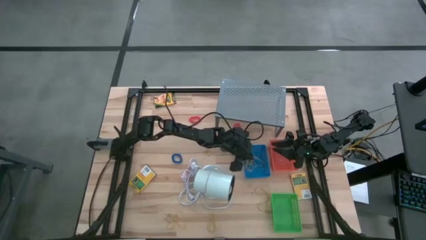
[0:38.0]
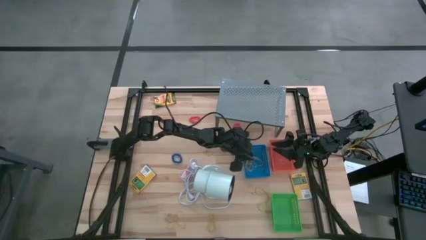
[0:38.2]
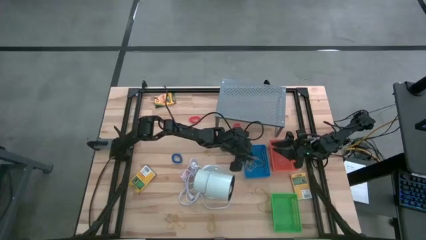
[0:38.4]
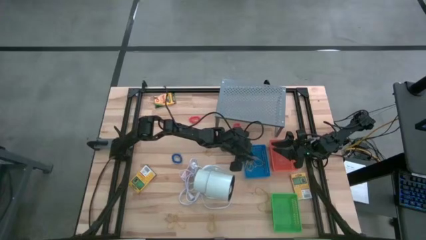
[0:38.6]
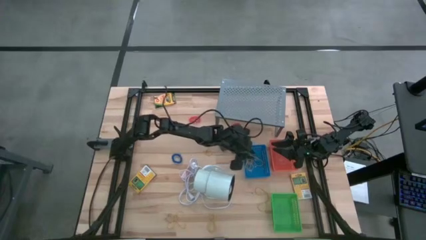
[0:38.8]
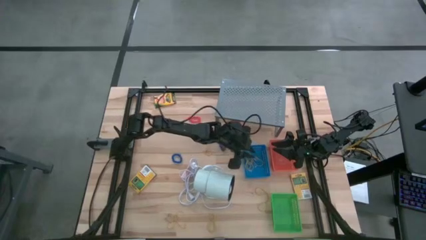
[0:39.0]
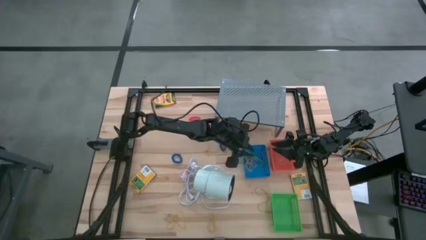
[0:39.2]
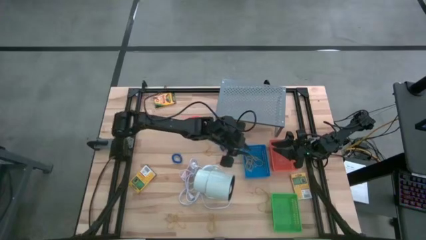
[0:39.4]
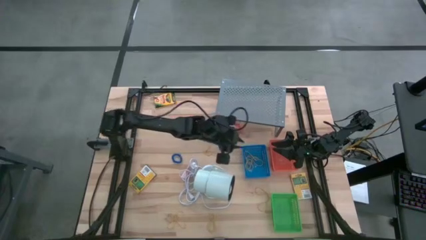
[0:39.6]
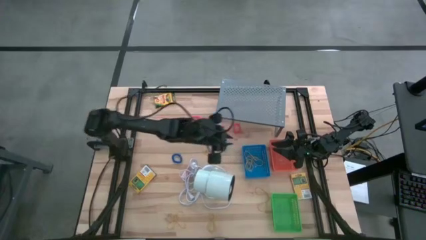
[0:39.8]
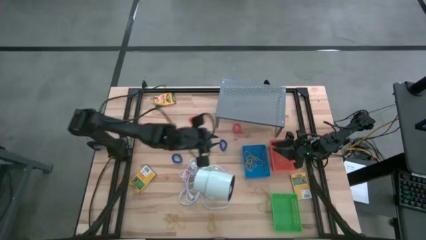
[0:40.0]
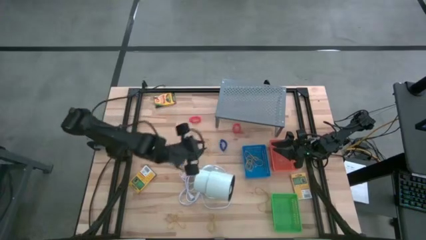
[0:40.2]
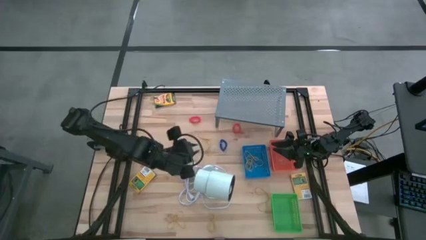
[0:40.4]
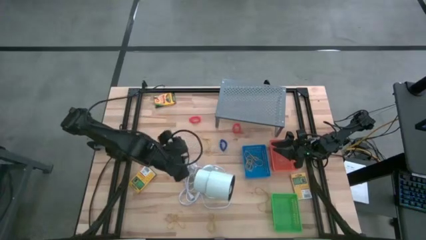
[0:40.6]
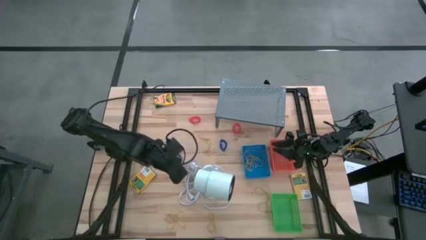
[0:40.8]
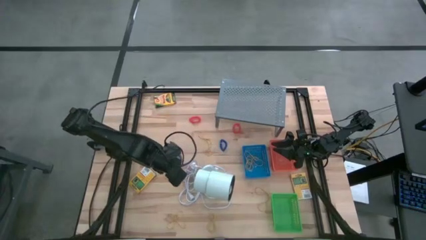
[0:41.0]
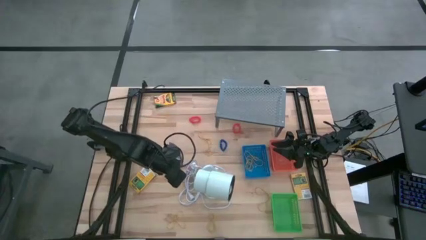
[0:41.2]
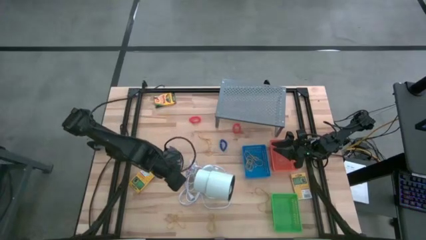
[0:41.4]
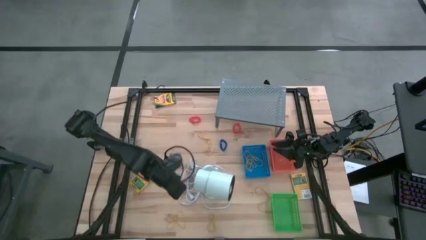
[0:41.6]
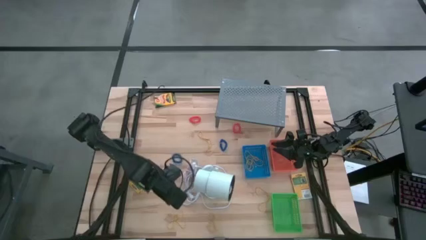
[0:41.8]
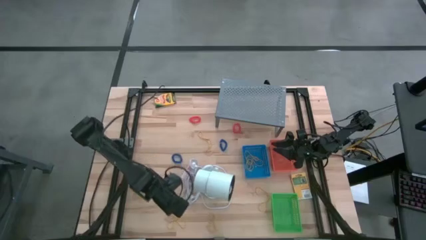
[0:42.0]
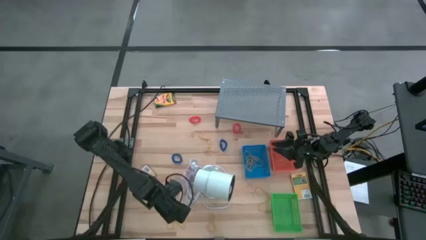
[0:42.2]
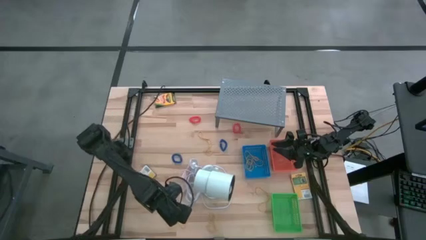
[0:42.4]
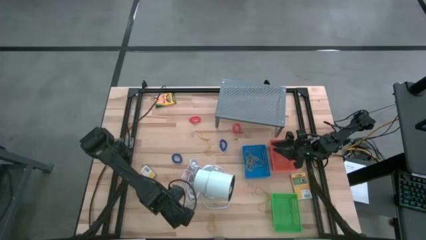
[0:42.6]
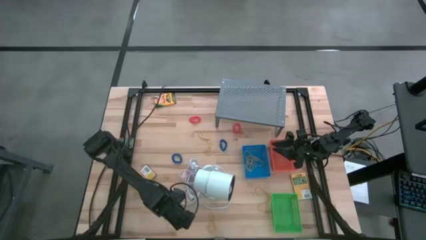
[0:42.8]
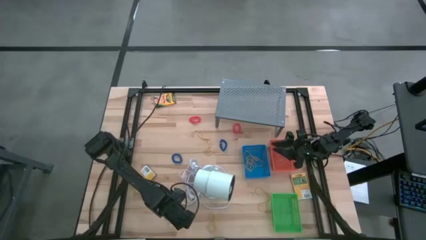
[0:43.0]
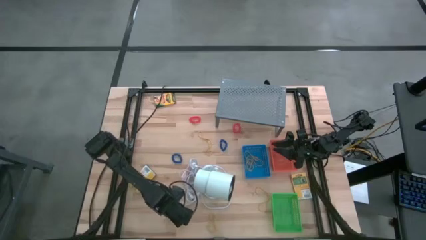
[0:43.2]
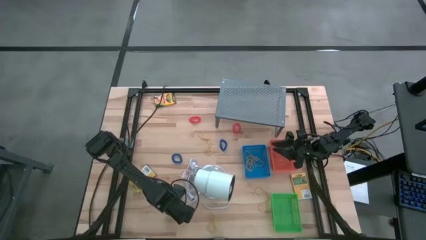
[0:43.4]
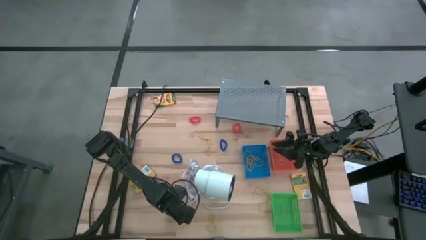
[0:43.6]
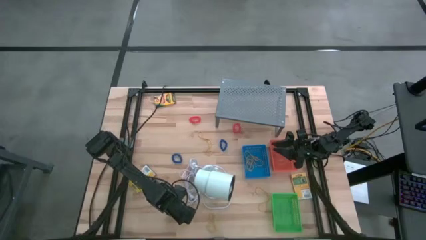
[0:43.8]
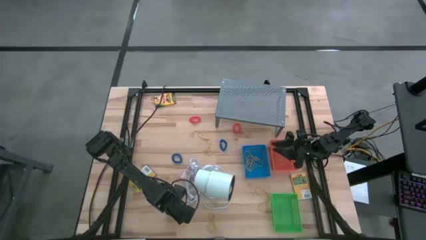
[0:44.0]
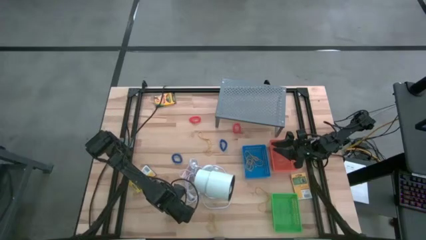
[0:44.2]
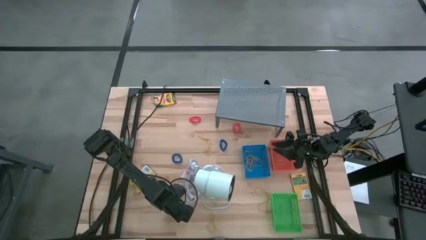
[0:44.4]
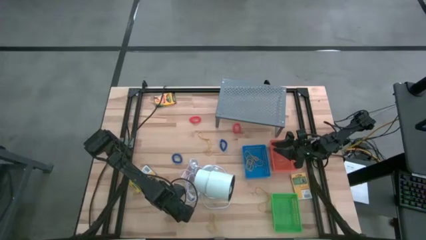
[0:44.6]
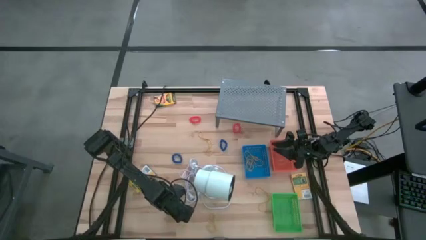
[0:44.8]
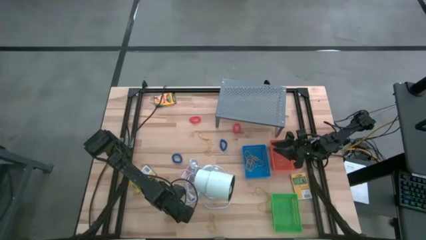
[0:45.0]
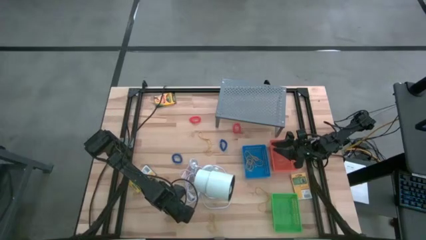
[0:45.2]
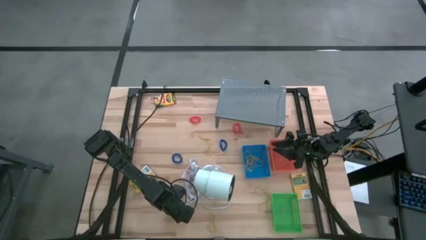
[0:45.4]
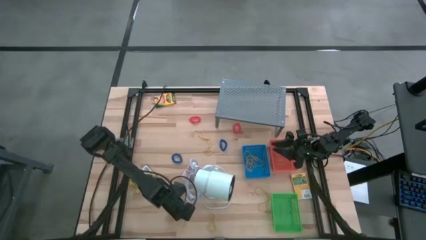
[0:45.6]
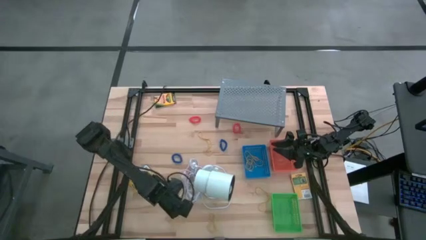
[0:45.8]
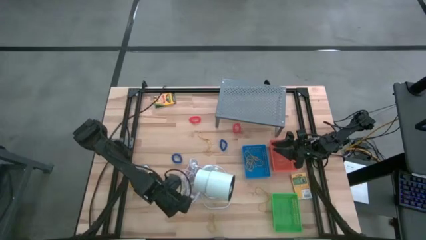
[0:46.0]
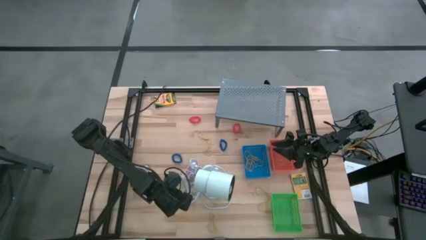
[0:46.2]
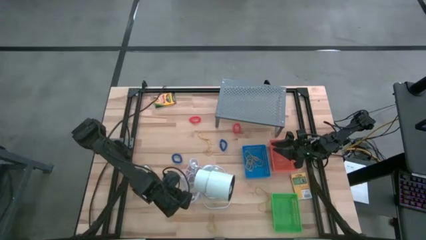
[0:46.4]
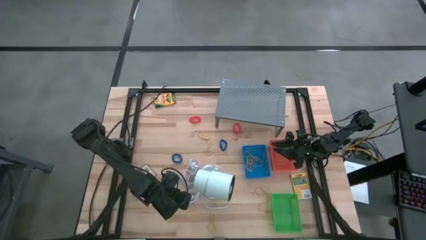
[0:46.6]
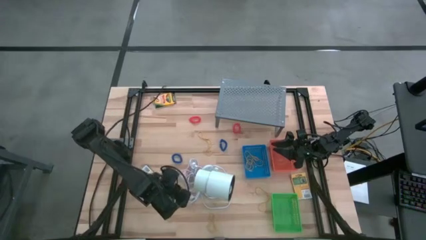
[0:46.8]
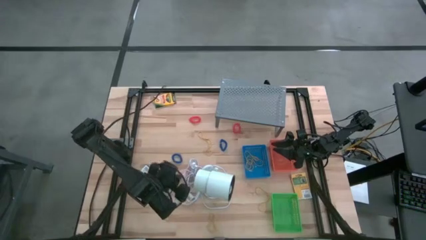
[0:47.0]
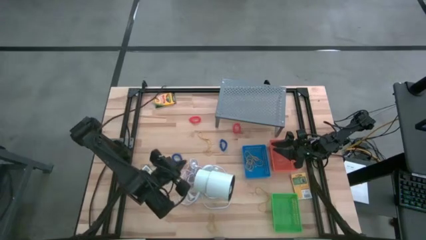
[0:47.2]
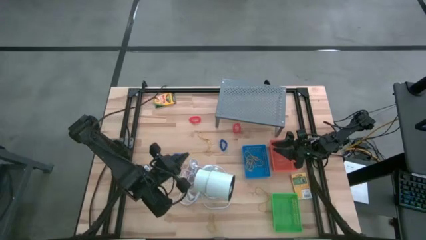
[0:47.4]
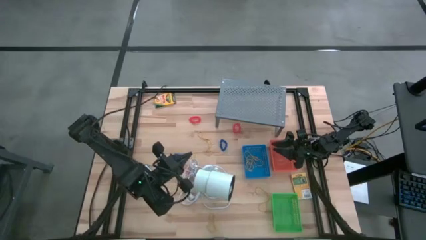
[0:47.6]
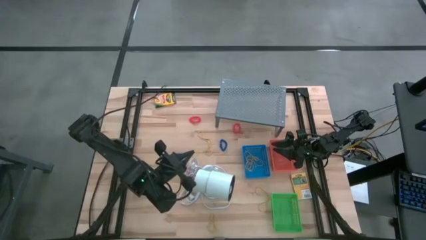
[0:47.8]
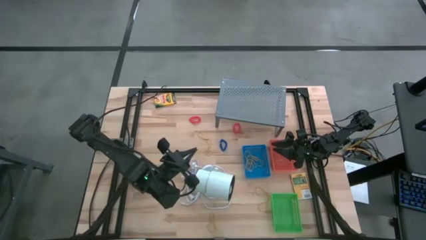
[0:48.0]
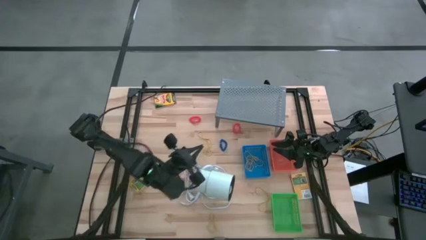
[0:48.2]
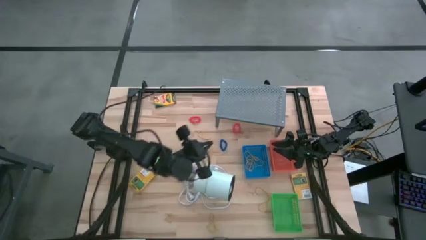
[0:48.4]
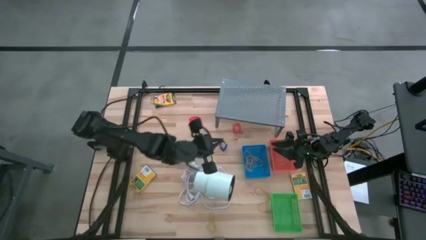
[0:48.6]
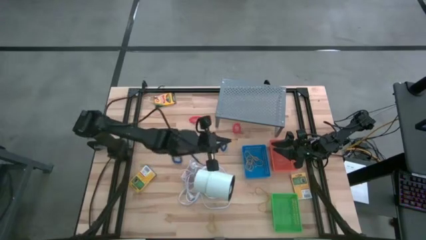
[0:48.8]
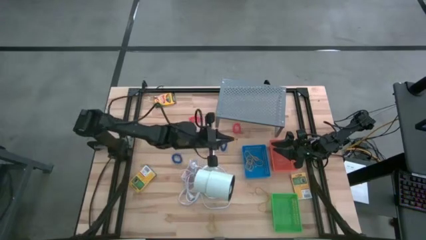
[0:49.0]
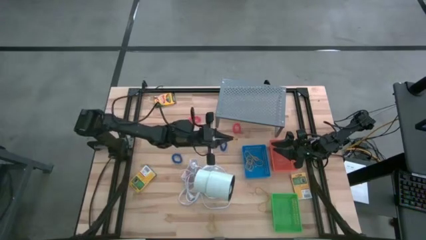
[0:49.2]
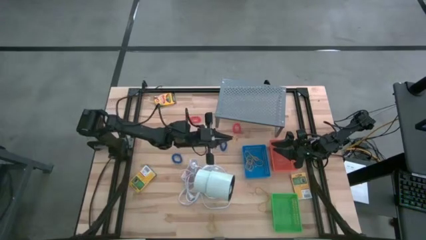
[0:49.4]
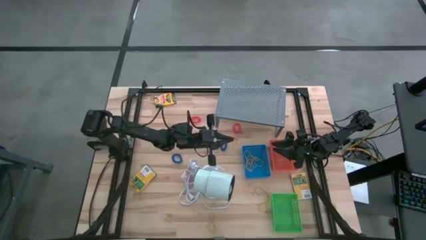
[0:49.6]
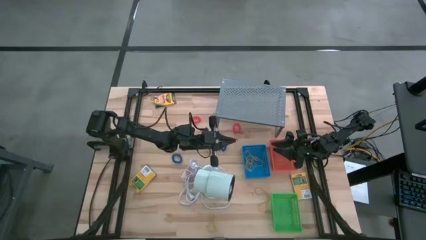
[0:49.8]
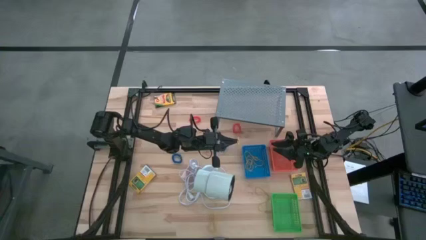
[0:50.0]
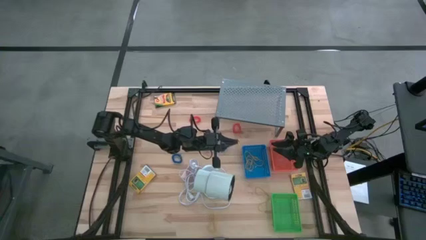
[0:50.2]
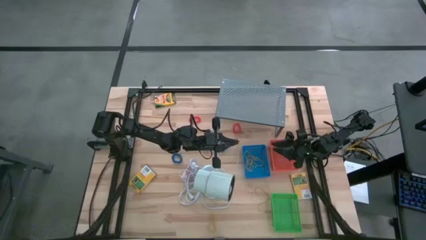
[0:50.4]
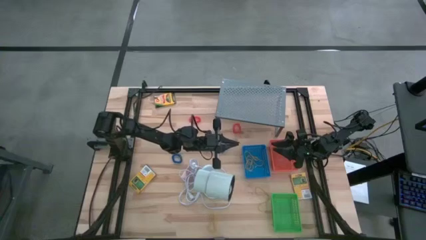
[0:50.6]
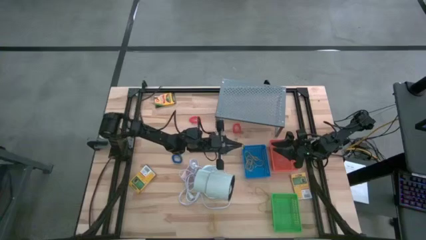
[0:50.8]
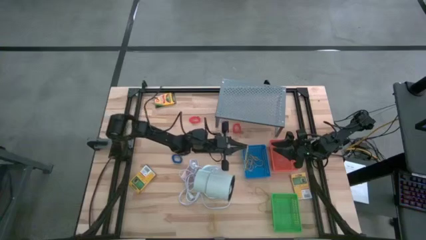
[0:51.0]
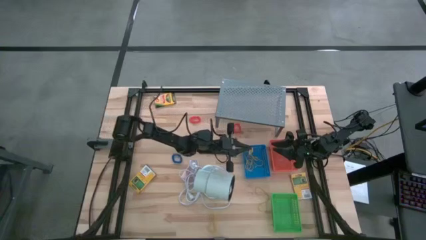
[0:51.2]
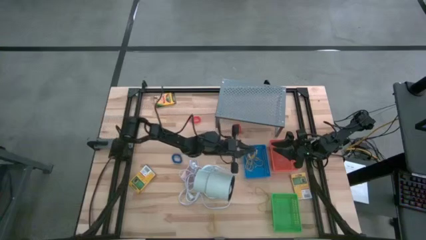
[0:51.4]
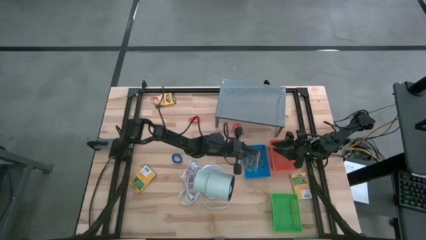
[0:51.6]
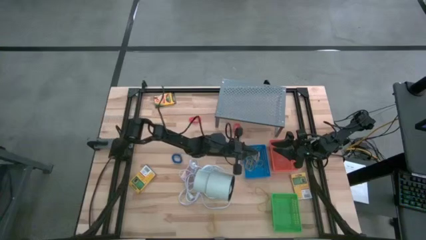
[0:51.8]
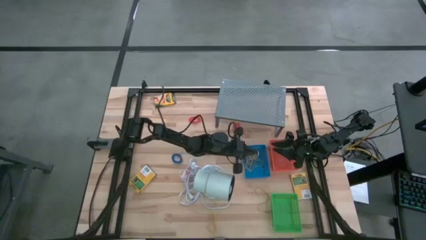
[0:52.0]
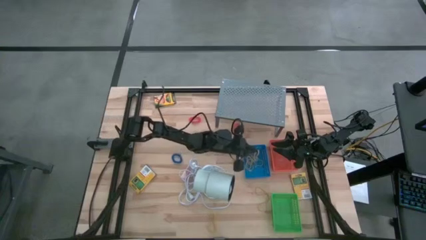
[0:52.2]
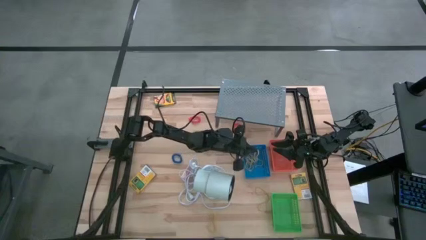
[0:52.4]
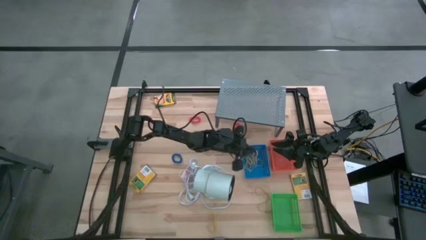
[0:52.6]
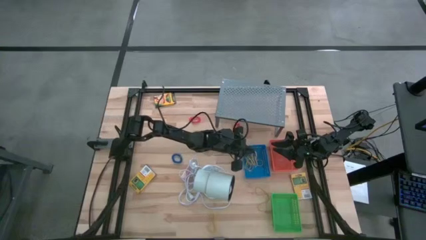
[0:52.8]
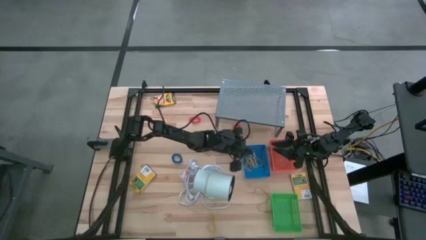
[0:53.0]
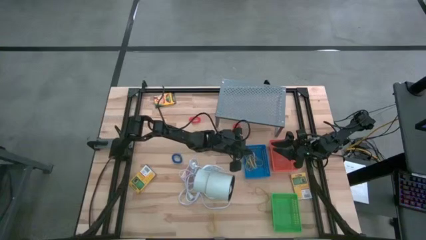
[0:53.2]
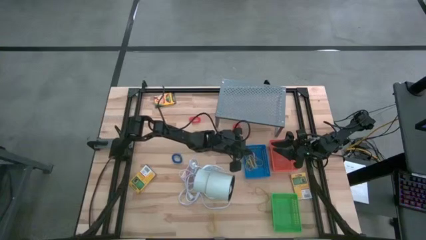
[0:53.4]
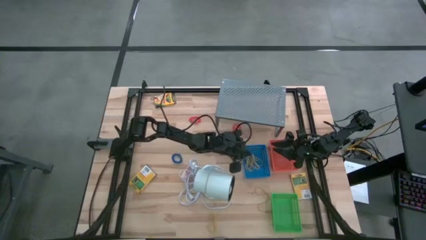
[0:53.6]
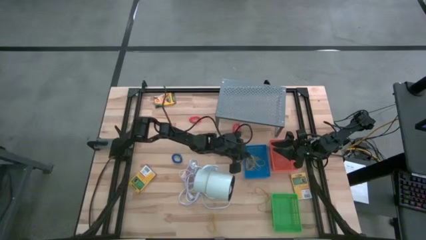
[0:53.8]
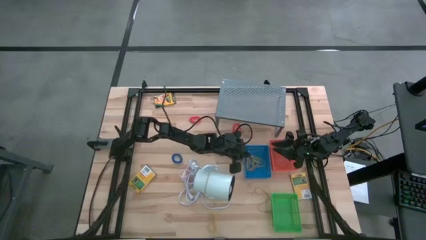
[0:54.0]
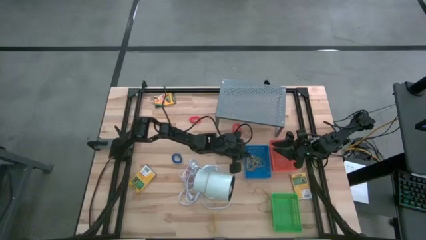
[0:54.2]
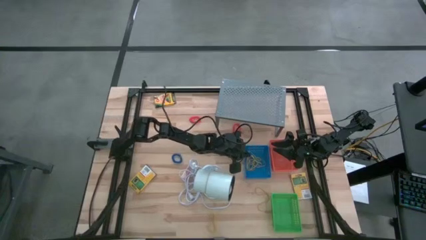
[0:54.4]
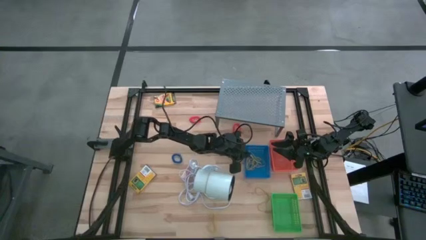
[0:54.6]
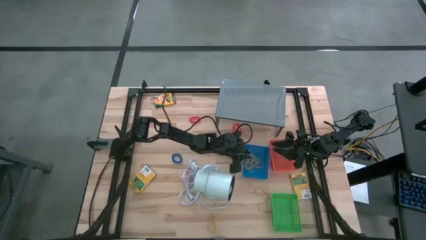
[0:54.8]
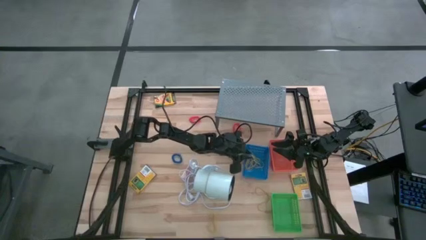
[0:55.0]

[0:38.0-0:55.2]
Task: Pick & Place Office Desk Supplies
Put the yellow rubber band into the blue bin
